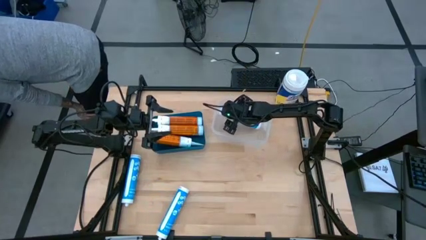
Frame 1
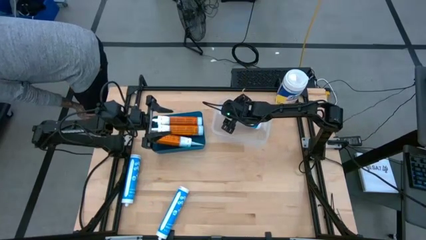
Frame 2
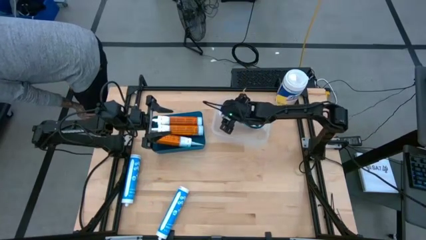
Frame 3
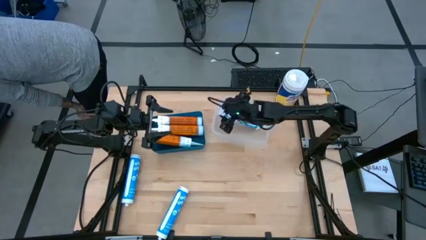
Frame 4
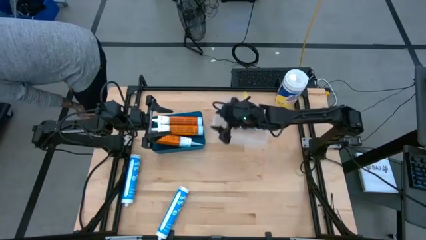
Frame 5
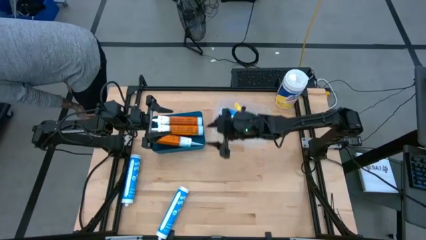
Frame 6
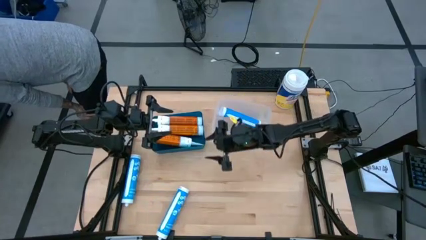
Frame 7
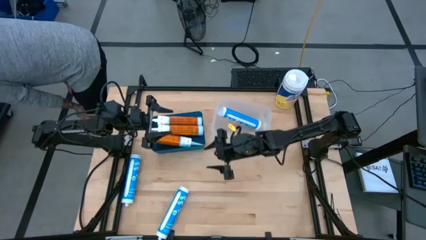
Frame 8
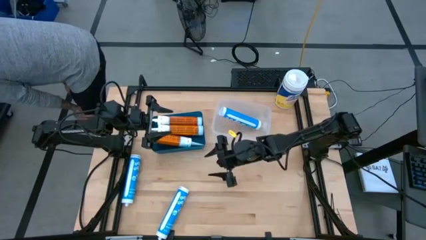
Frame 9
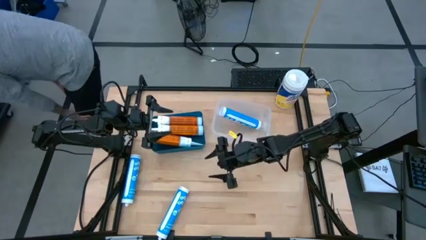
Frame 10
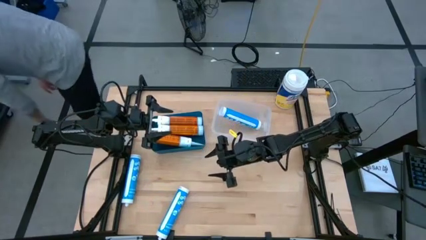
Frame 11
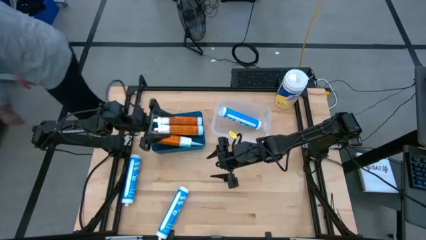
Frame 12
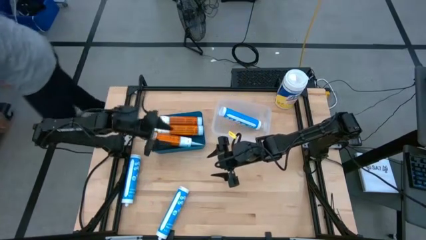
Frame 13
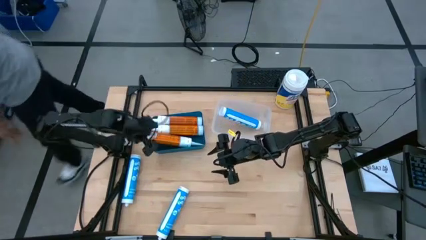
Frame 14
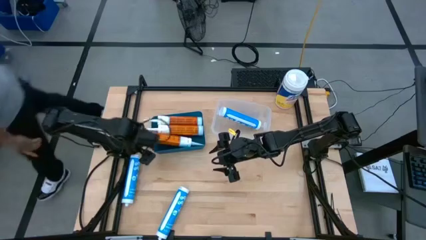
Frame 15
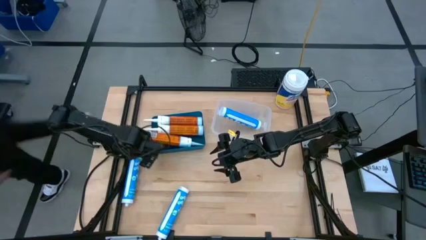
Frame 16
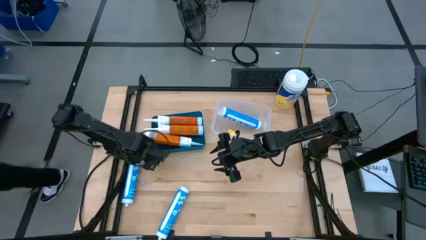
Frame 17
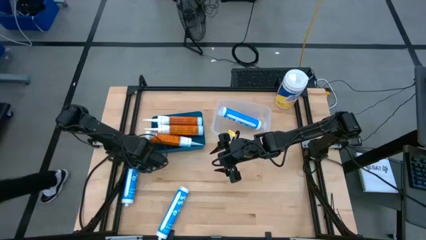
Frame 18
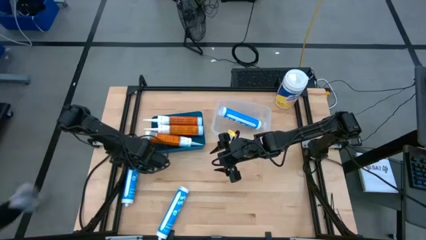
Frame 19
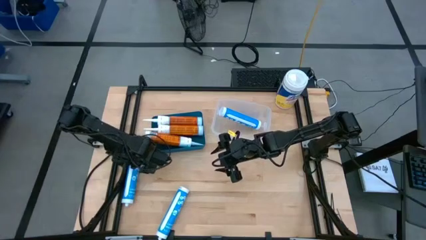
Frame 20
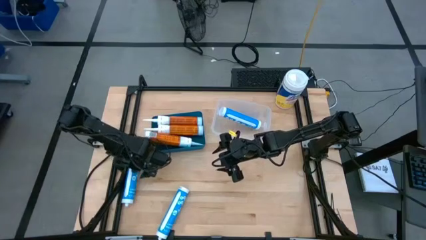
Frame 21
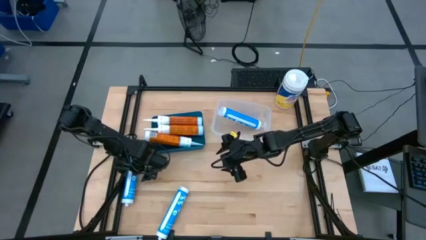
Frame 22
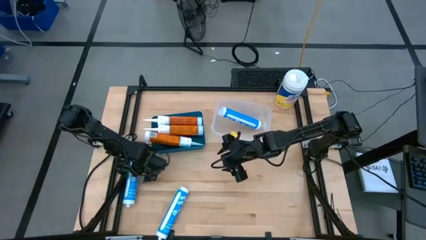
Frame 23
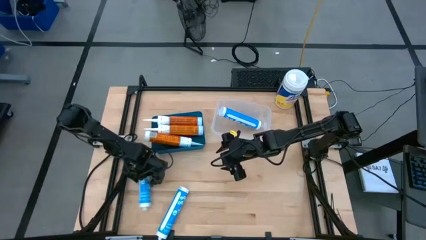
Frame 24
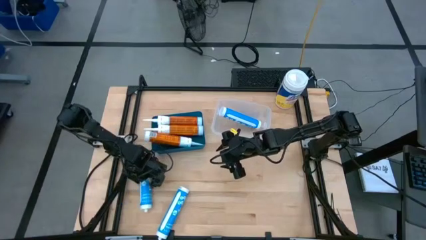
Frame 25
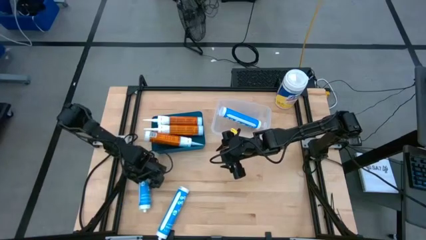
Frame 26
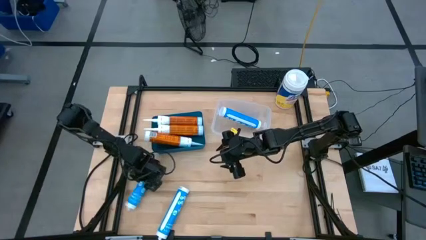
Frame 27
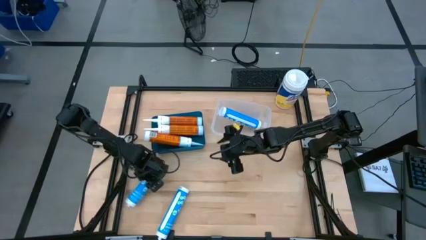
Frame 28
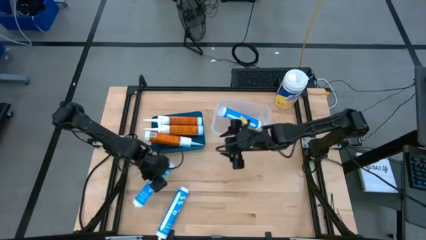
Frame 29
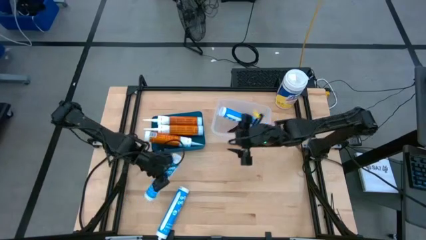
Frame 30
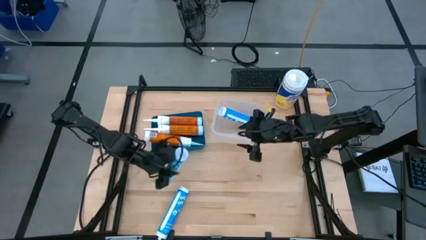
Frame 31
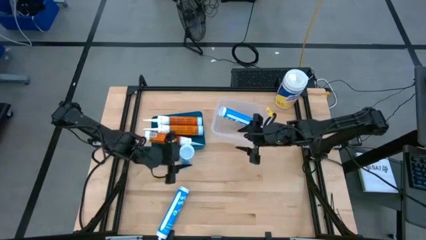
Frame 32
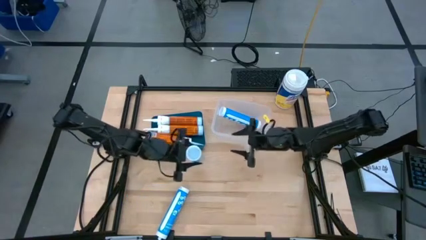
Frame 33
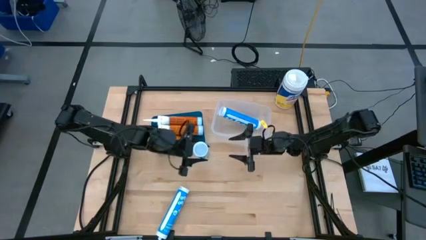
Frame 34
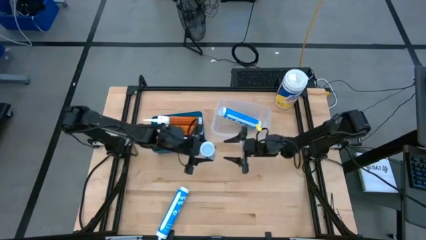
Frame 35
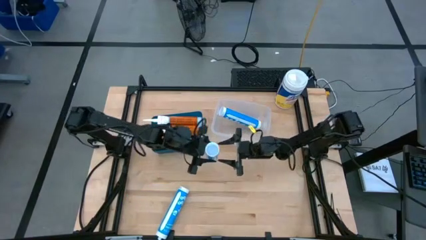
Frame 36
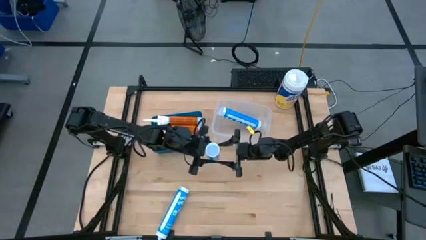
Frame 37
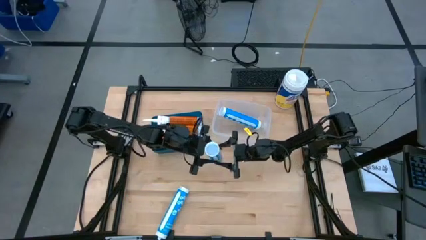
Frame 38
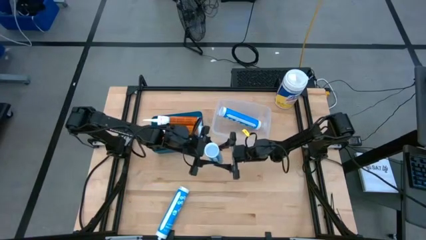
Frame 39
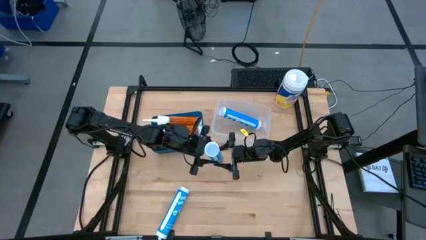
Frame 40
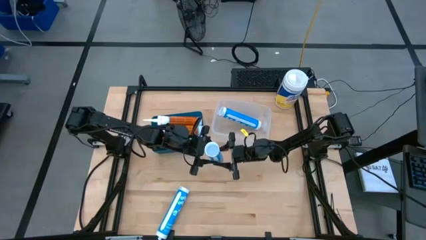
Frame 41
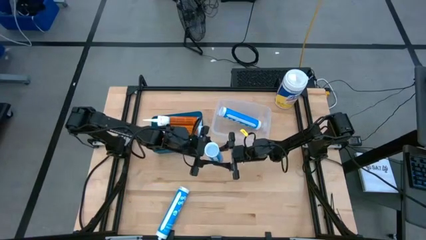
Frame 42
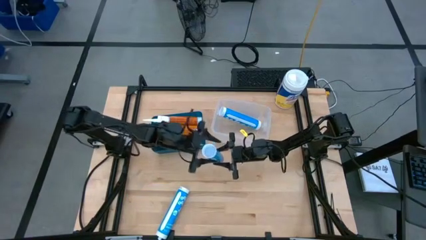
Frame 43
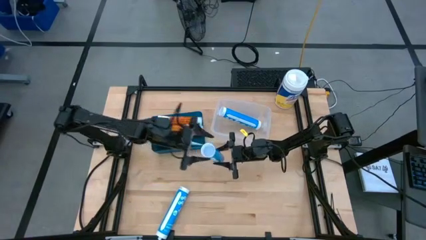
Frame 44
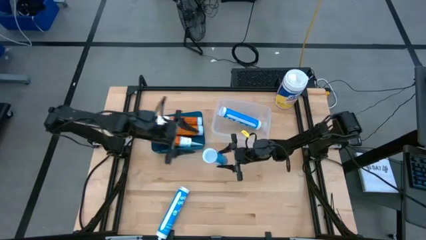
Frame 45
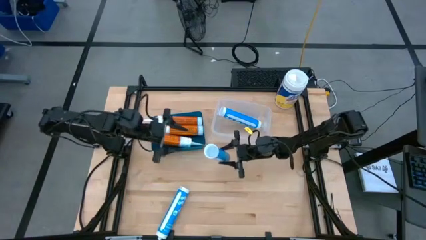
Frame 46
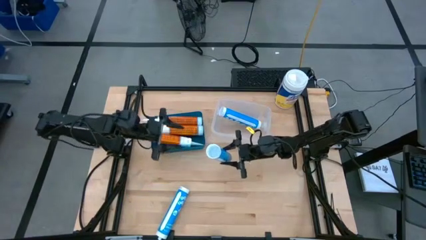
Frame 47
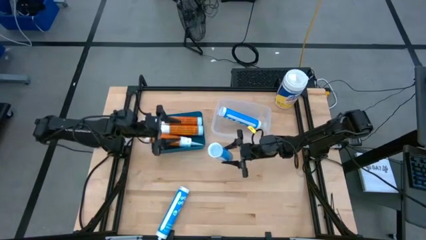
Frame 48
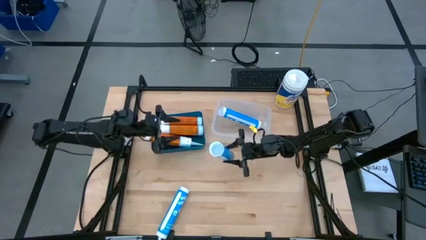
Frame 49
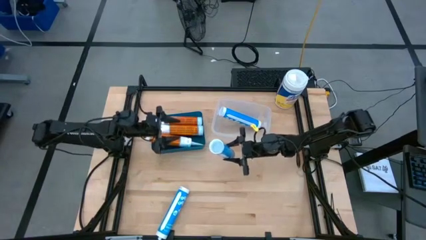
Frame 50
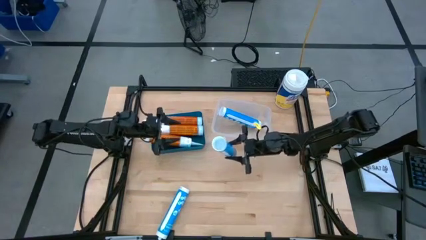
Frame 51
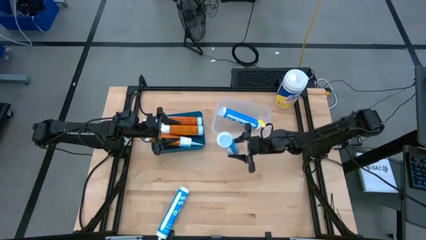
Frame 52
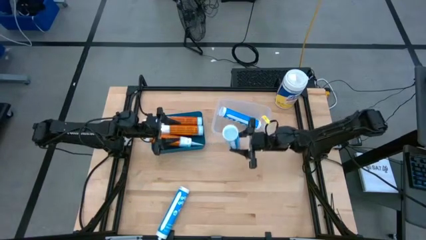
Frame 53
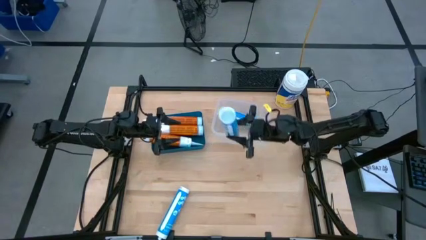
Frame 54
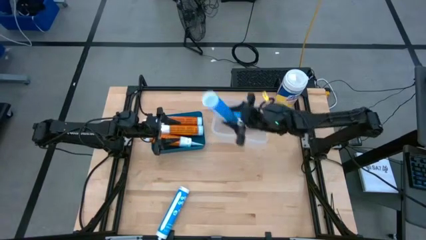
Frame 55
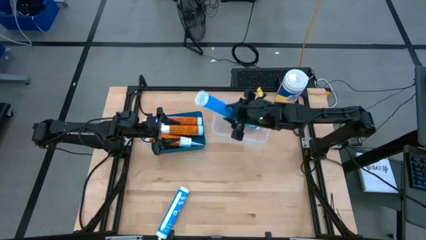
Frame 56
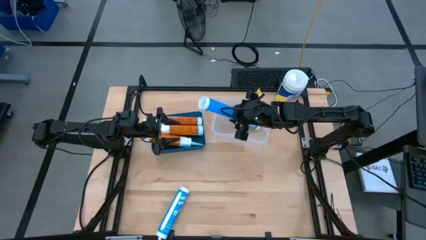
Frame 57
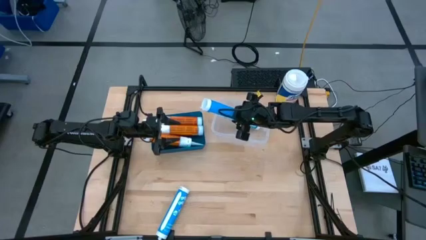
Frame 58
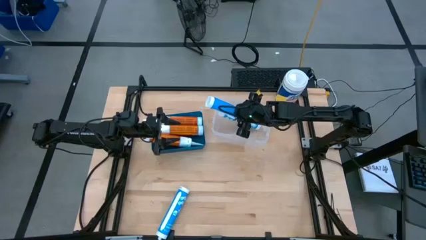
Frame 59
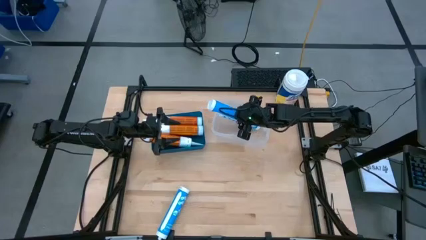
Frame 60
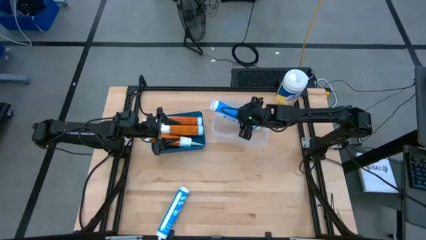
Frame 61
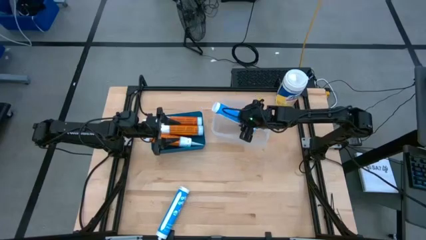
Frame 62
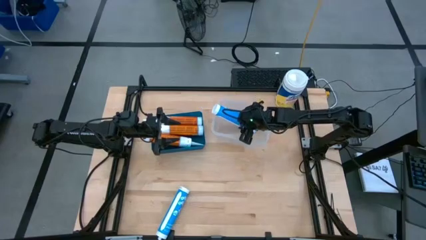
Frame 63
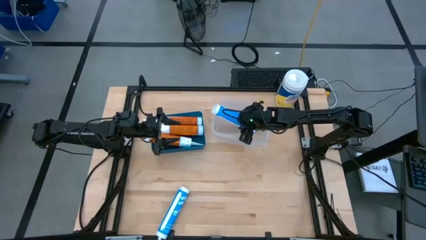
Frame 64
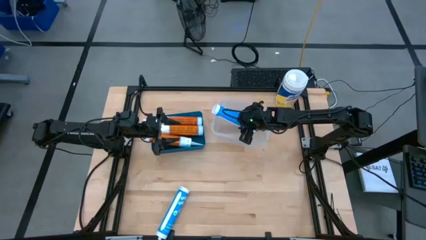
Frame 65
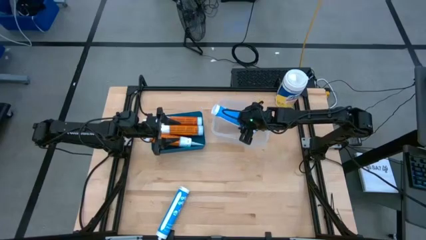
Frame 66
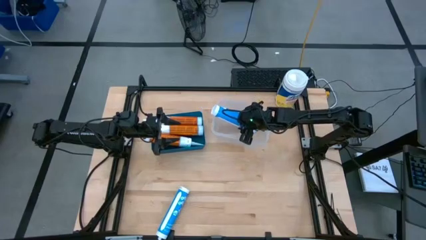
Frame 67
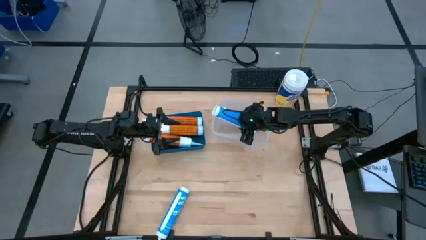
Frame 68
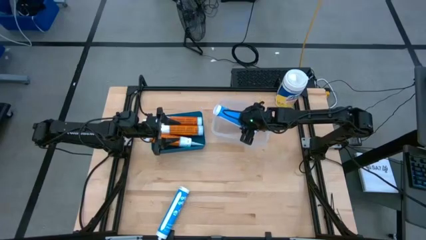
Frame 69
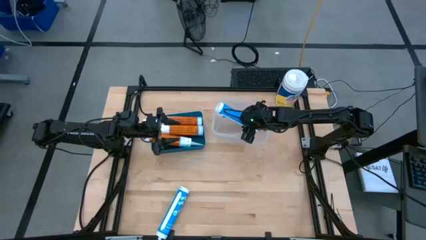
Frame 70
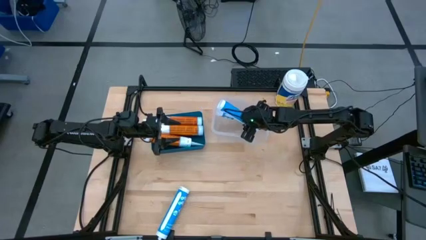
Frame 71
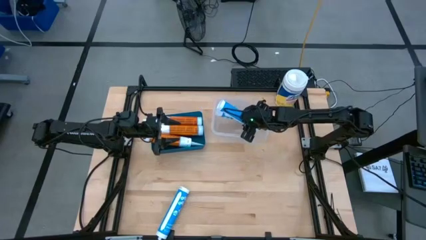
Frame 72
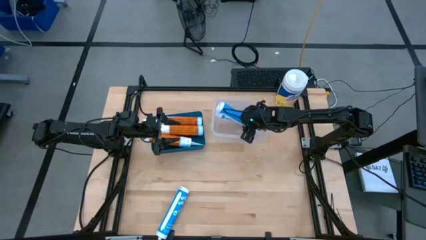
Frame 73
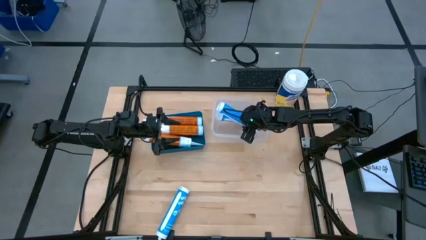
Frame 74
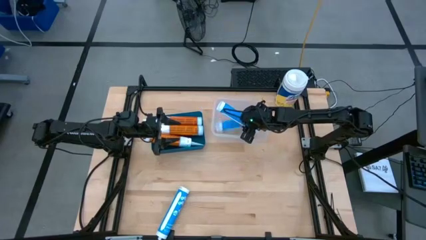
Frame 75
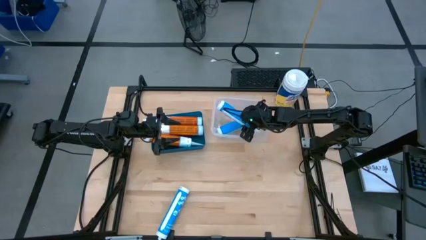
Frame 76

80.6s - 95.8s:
Task: Pick & place silicon tubes, Sealant and Lysol wipes
Put the left blue sealant into the transparent bin

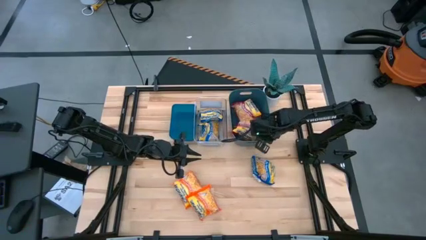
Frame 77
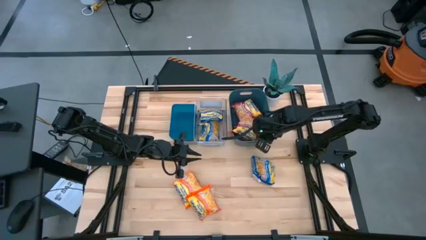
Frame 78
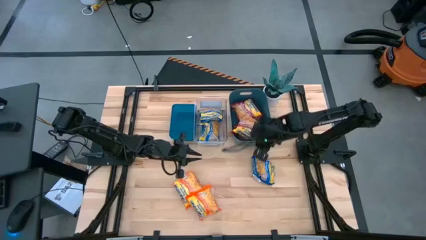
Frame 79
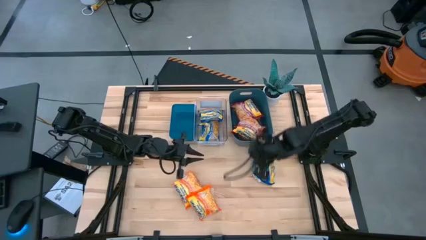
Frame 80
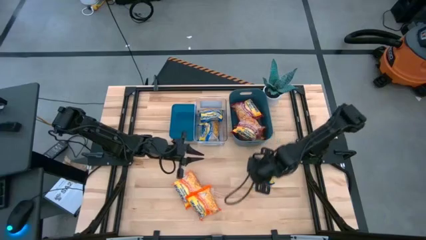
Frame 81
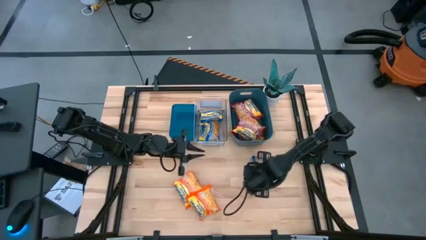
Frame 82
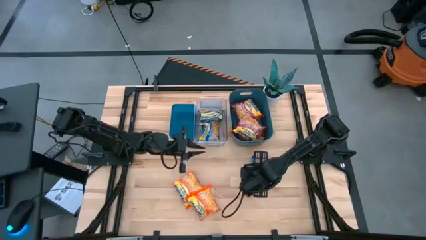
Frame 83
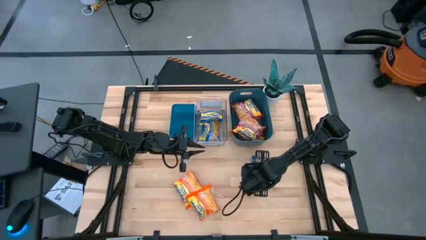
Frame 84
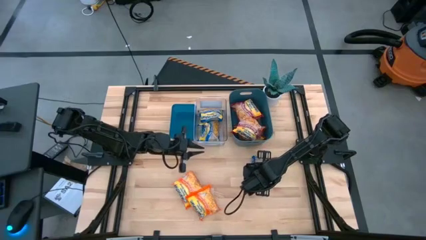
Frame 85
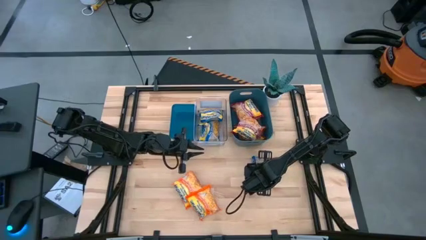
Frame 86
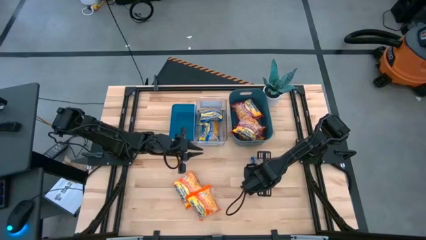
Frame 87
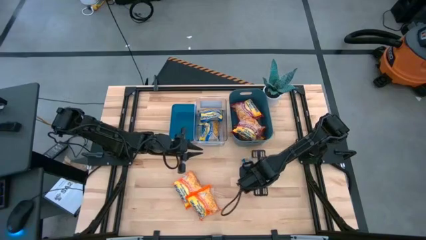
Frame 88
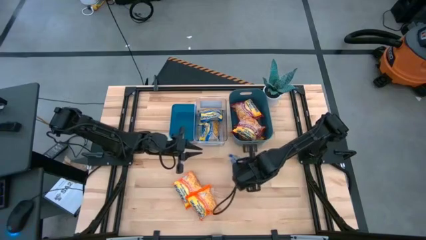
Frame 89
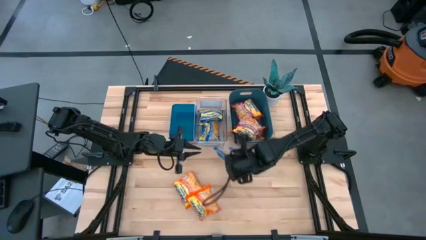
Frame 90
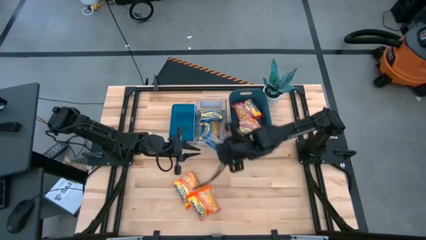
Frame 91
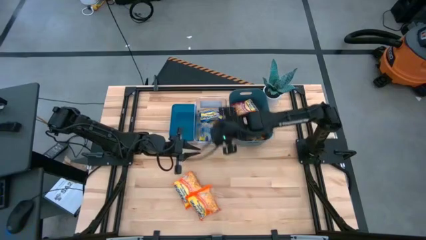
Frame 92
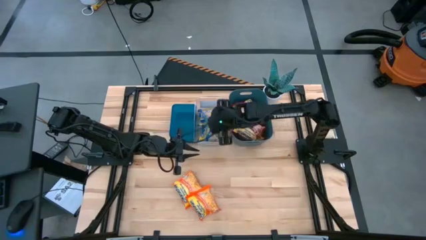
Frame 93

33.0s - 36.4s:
Task: Sort Maruchan noodles
Put the blue noodle pack into the transparent bin
